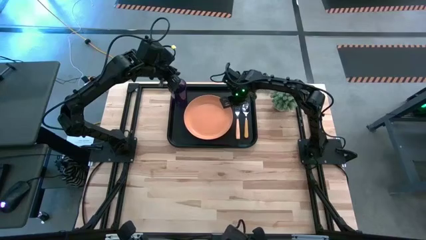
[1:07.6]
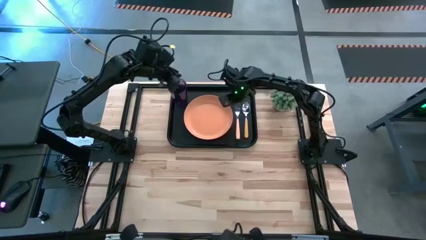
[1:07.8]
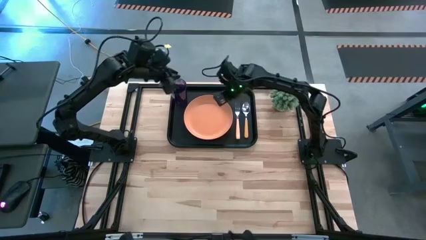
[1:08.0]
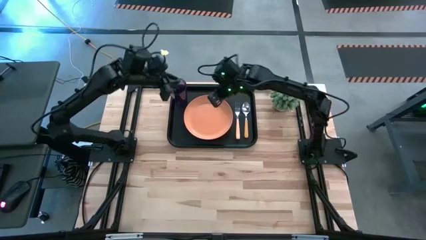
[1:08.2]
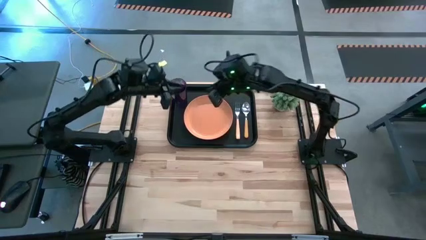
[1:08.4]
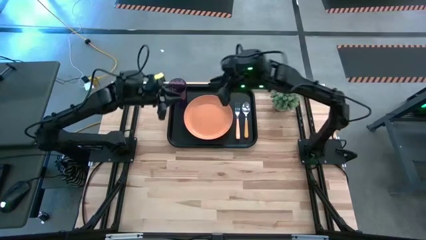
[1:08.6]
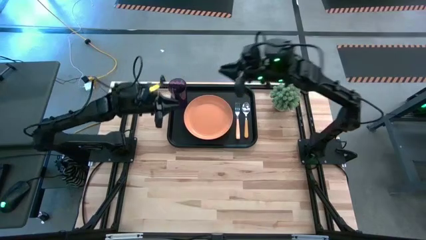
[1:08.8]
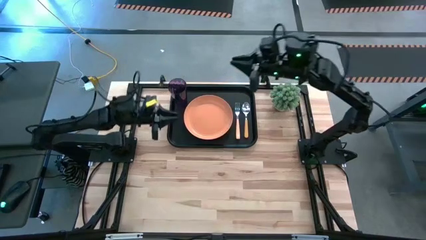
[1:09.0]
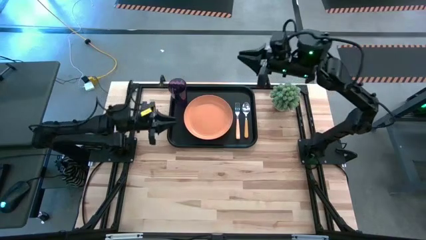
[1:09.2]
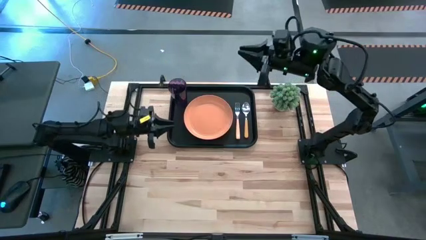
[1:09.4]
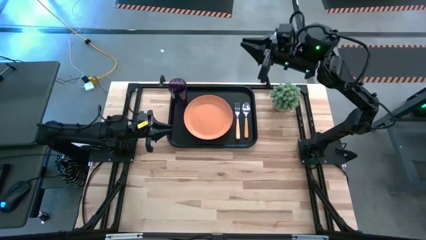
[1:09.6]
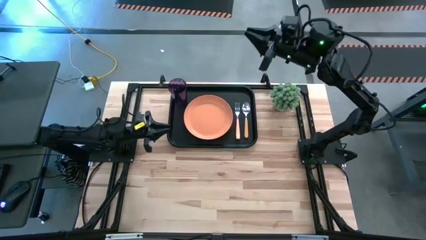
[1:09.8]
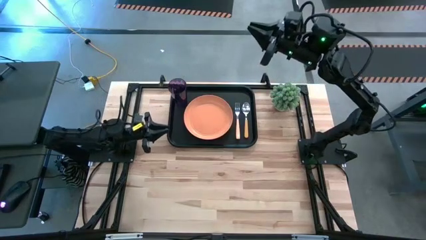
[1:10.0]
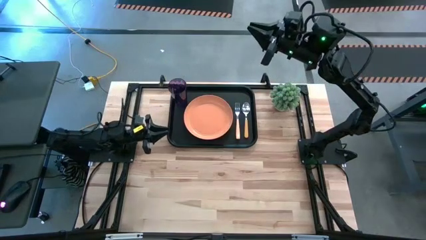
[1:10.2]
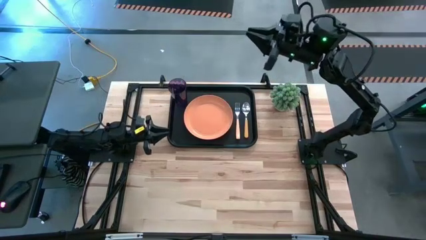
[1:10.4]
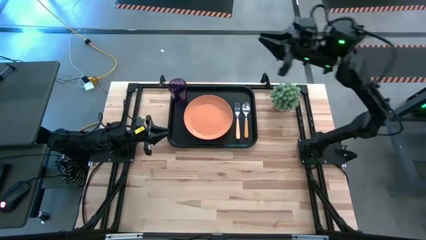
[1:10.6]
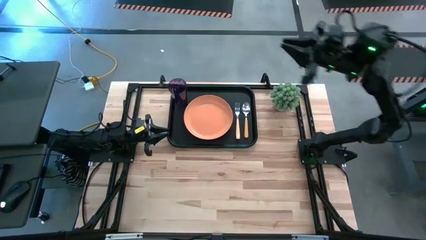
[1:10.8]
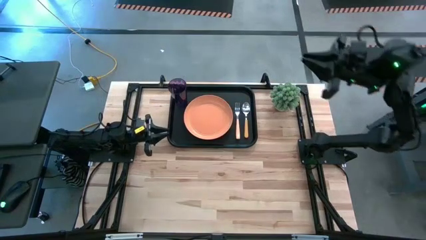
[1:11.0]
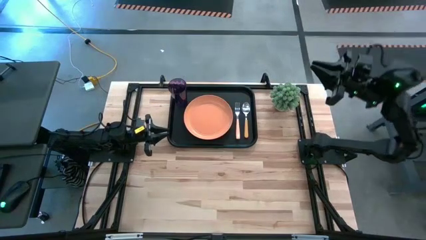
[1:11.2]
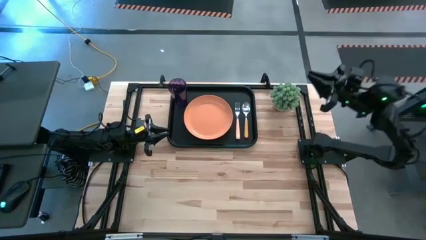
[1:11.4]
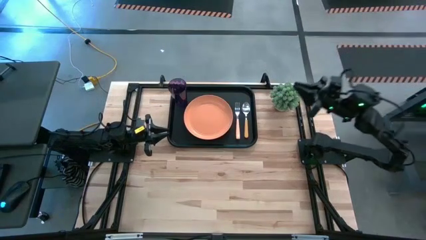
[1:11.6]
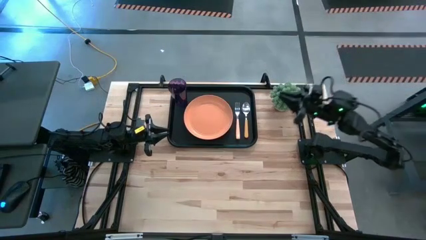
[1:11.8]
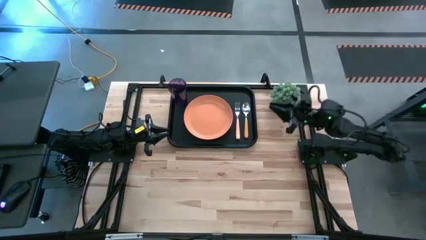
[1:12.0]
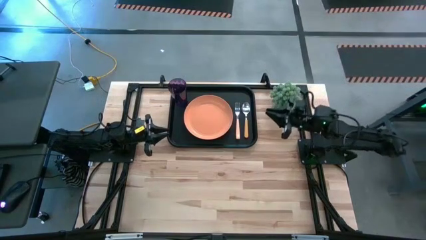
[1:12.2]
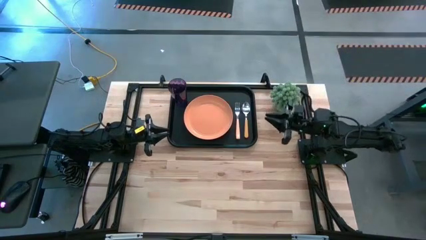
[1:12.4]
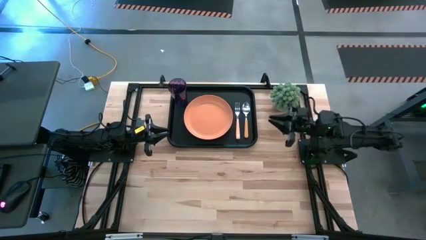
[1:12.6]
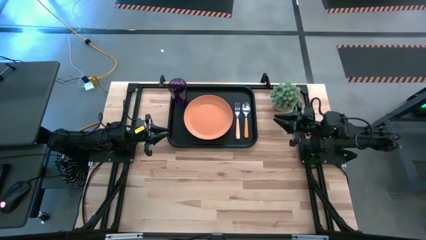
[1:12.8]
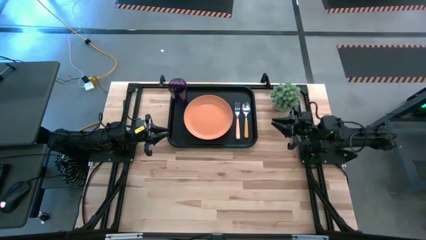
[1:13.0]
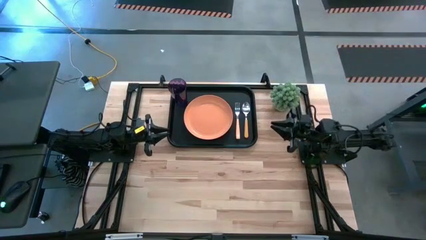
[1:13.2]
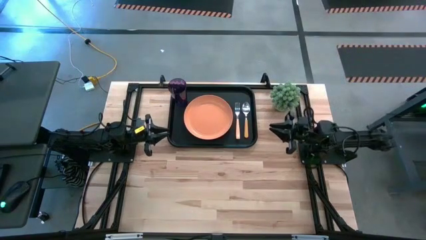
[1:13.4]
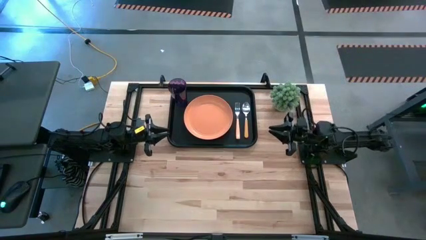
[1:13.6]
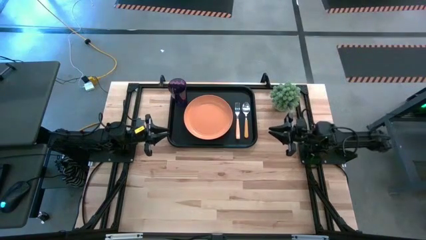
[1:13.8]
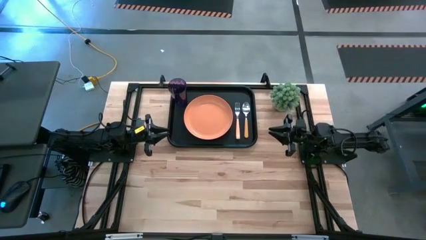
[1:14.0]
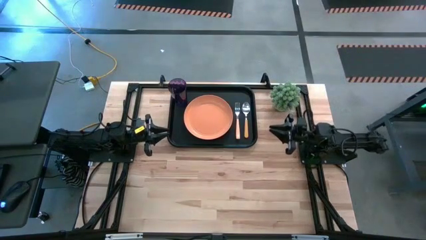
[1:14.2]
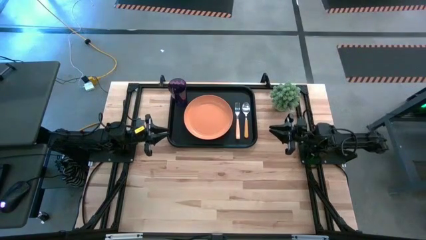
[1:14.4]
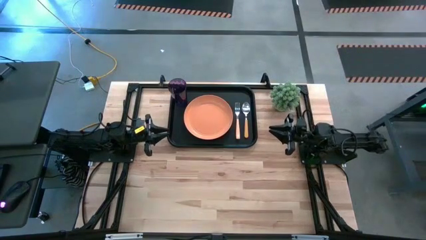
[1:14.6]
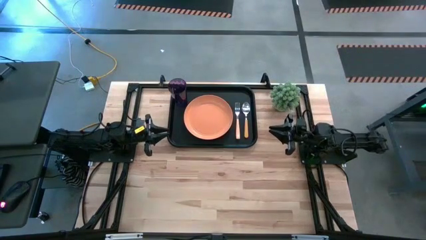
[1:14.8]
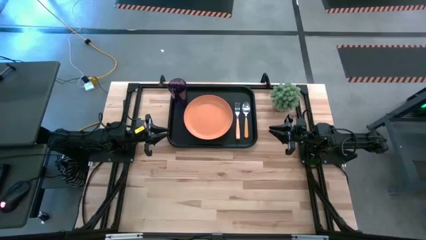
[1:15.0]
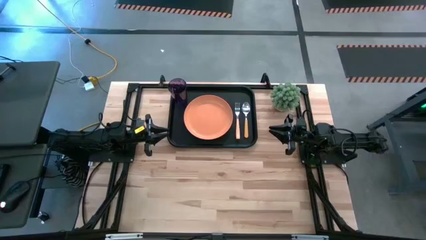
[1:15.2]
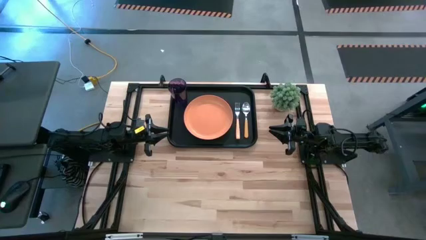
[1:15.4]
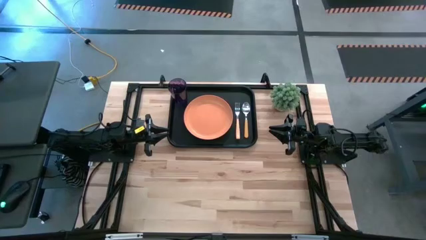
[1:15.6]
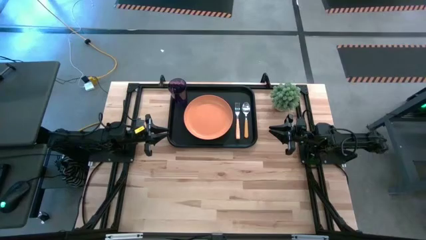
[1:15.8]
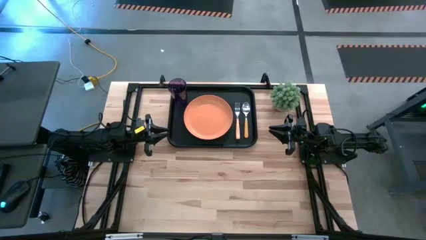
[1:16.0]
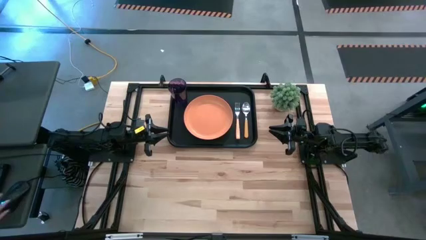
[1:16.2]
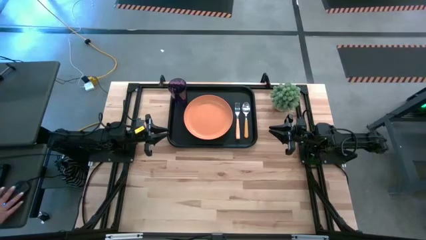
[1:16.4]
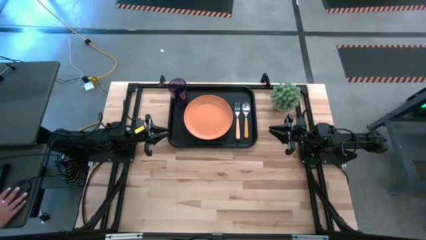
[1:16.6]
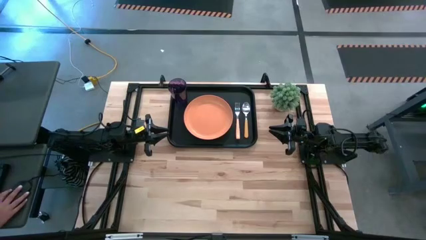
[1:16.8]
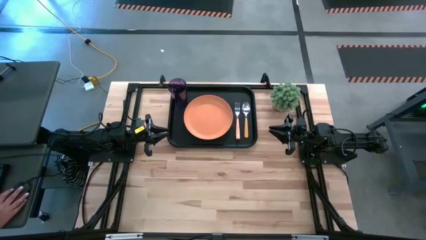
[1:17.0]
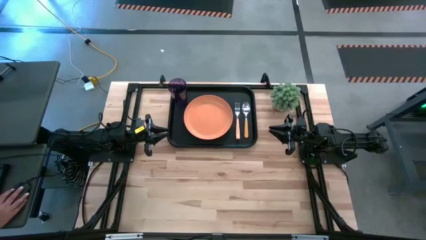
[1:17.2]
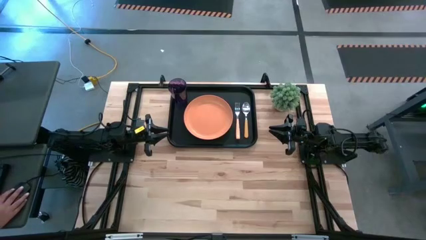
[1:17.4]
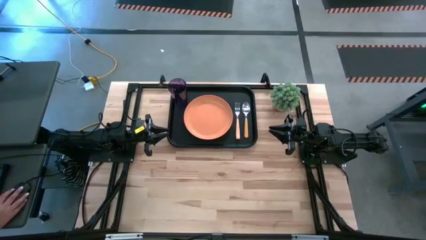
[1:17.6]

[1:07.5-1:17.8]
Task: Pick and place plate/cup/fork/spoon on tray
Return to Home Position

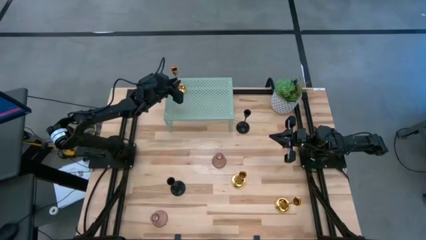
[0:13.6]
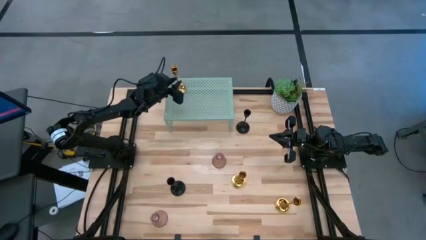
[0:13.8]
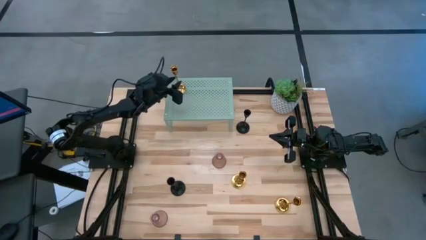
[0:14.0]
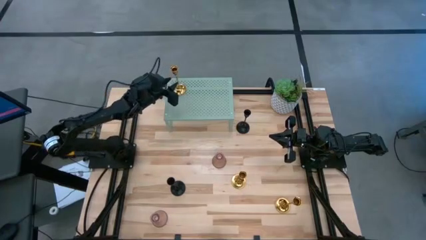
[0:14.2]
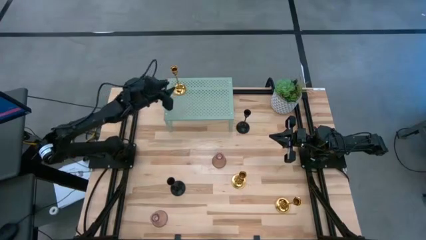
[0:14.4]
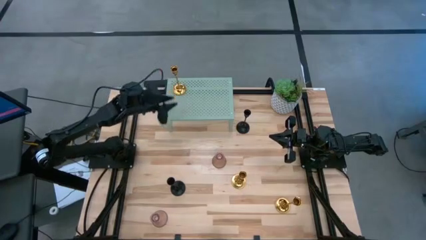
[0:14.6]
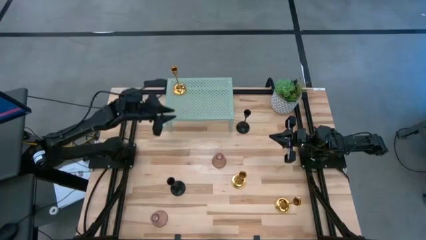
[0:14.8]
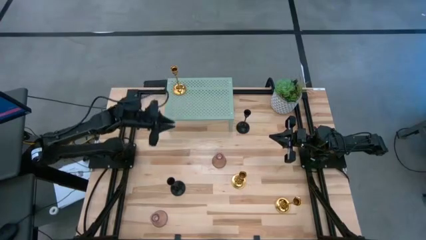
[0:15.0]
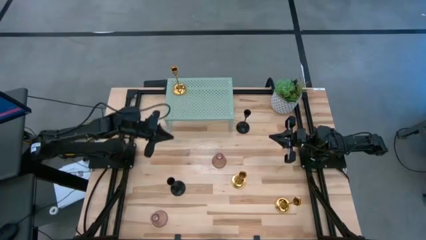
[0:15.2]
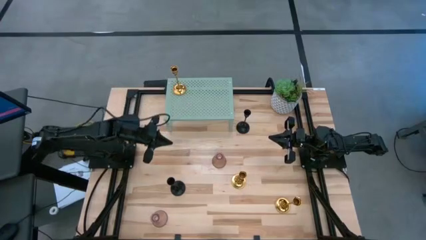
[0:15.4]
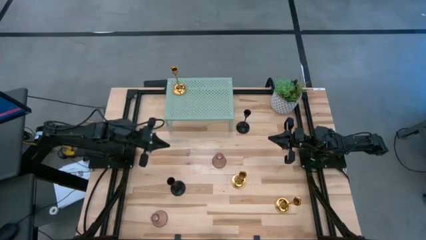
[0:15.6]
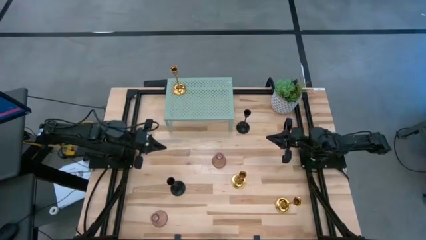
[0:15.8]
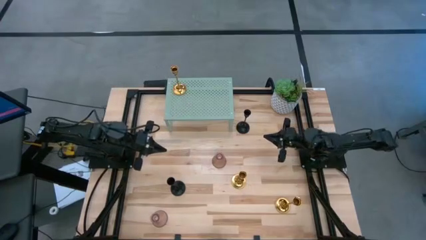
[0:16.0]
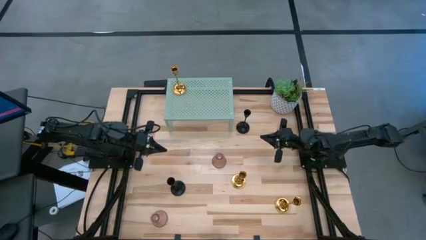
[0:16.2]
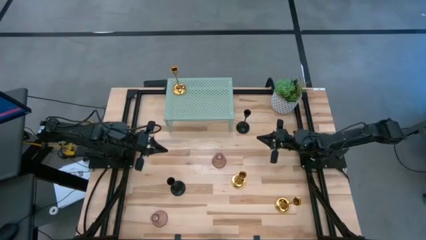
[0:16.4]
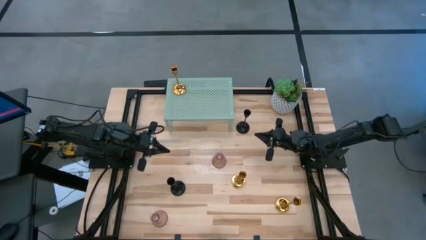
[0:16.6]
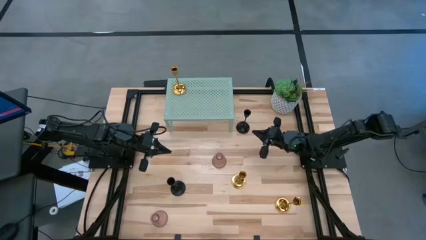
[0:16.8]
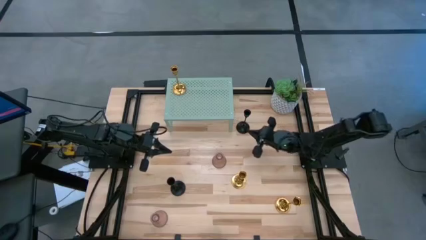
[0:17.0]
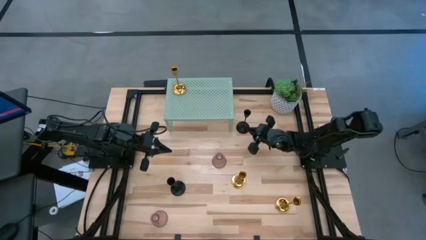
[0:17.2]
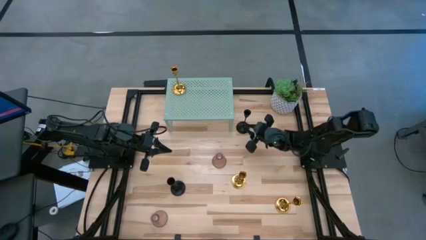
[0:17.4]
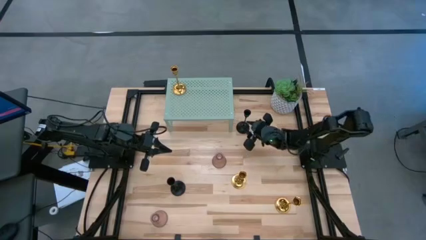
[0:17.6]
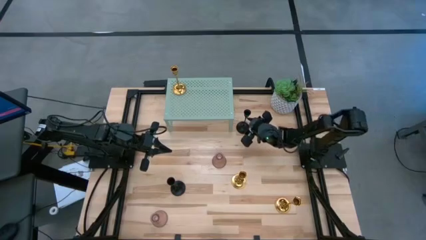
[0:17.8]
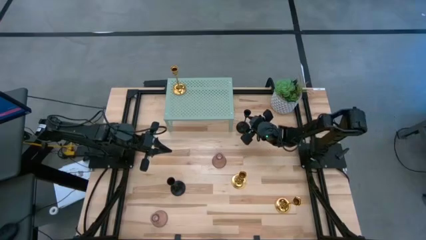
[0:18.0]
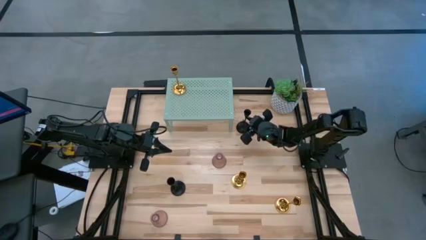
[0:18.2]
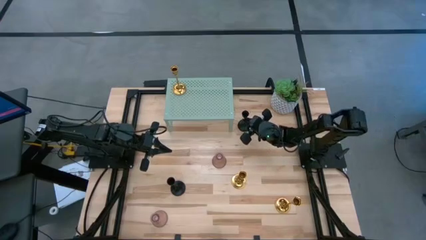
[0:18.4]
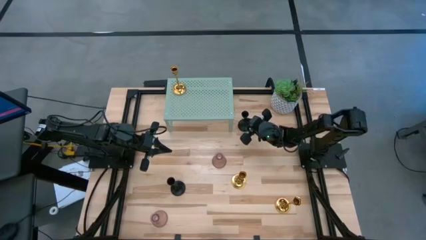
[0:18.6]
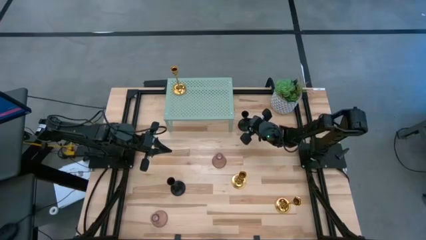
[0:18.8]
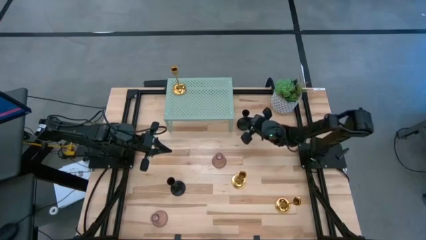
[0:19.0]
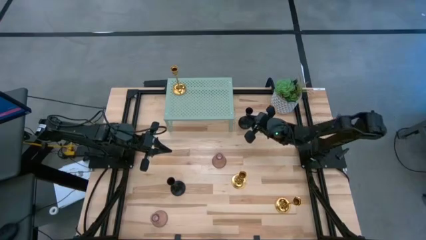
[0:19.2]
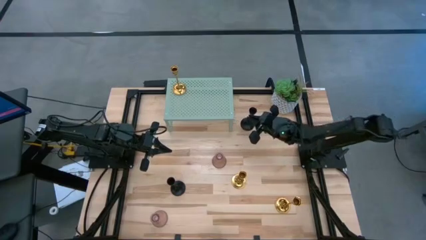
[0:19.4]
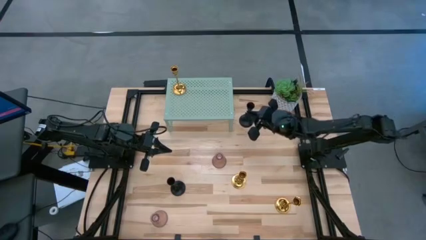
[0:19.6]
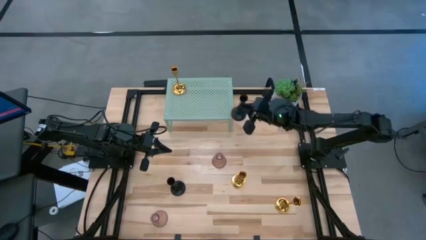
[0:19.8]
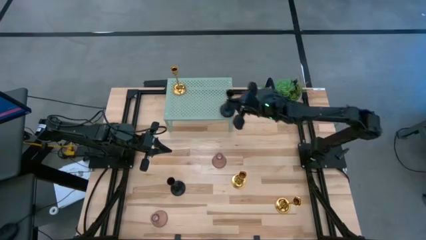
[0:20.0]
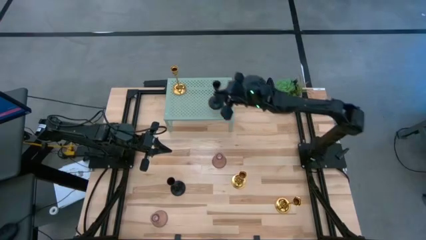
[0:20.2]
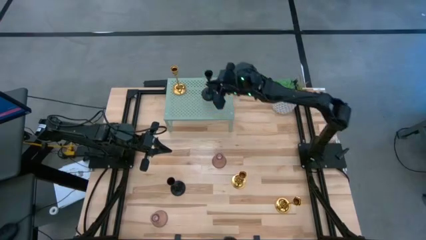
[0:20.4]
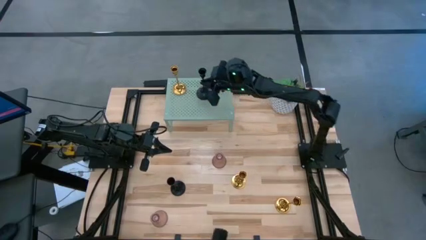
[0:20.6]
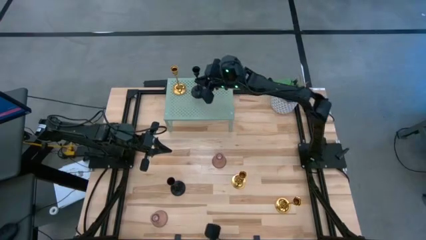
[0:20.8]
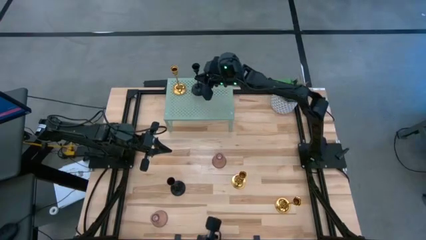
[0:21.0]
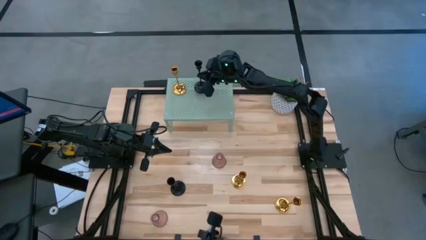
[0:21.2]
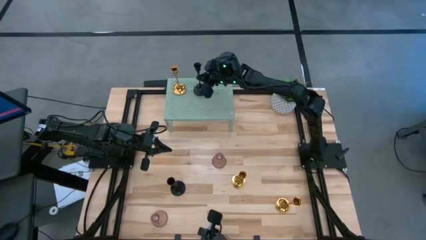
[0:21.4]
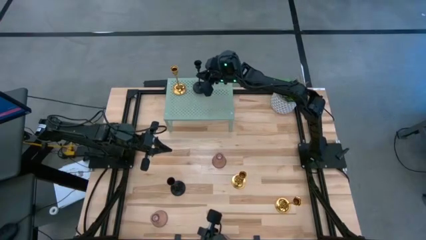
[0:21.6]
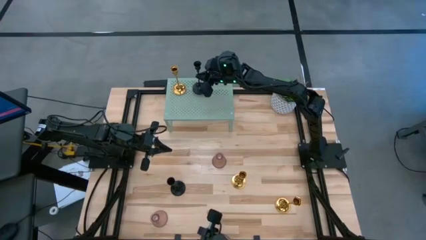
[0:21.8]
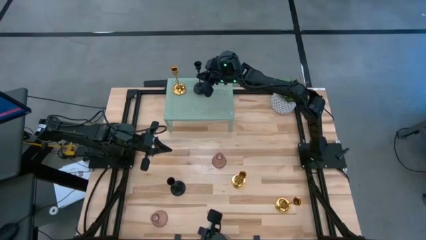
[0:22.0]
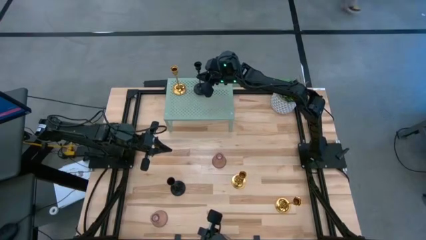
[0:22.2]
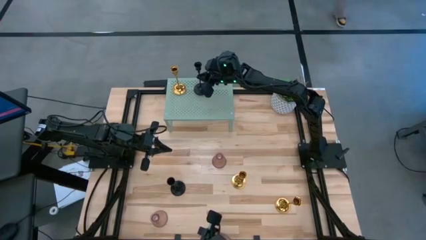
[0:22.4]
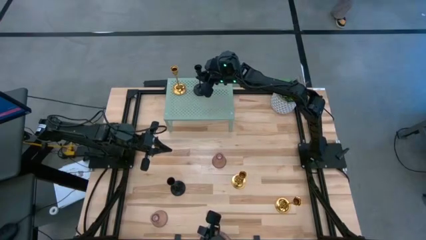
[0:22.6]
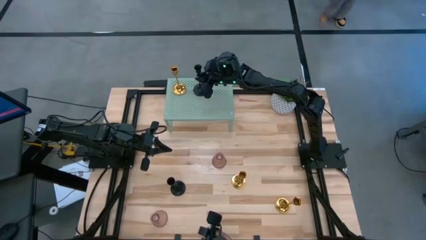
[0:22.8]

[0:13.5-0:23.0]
Task: Pick & Place candle stick holders
Put the top black candle holder on the shelf
